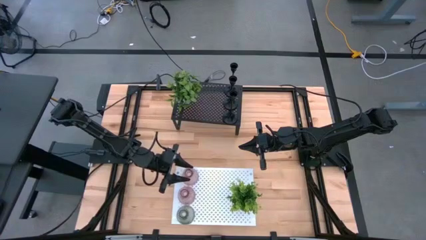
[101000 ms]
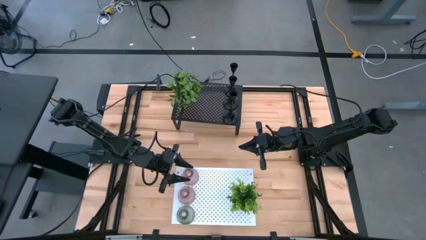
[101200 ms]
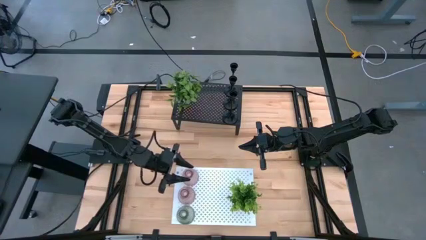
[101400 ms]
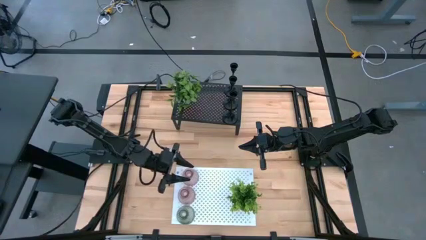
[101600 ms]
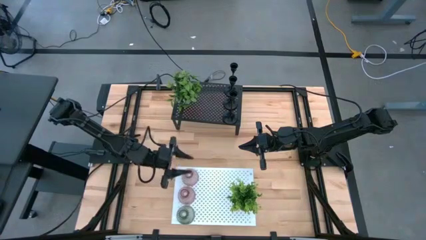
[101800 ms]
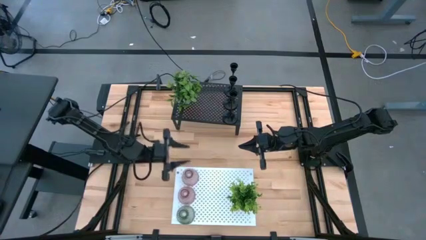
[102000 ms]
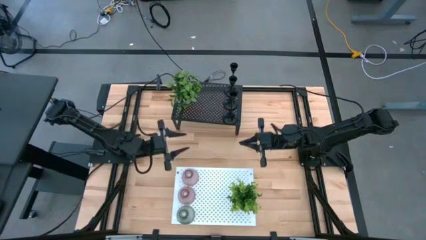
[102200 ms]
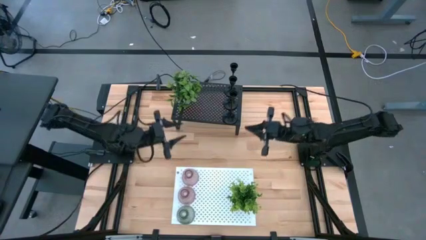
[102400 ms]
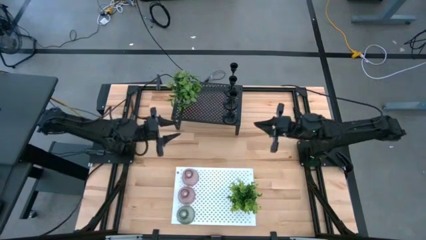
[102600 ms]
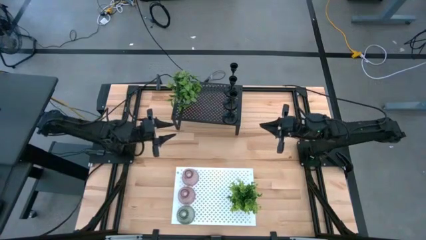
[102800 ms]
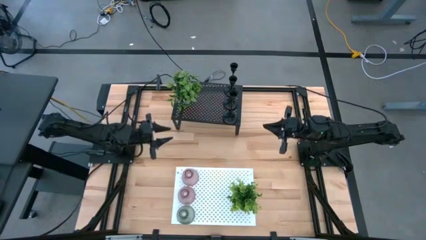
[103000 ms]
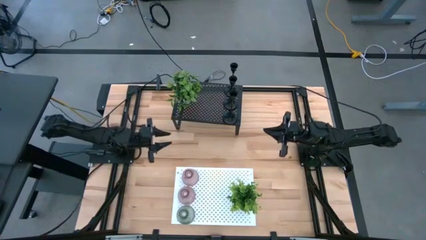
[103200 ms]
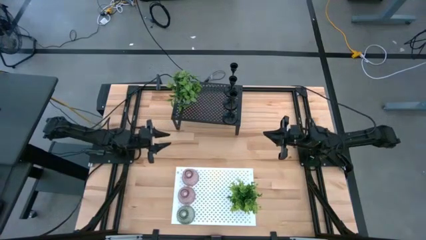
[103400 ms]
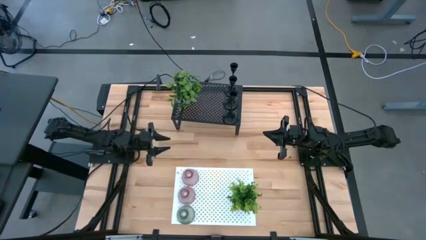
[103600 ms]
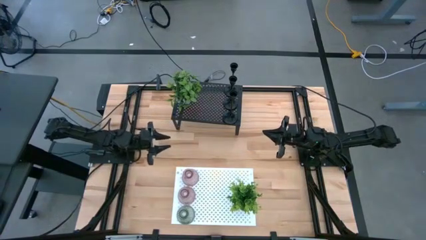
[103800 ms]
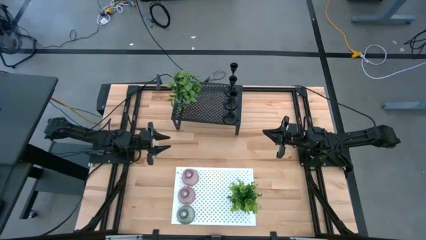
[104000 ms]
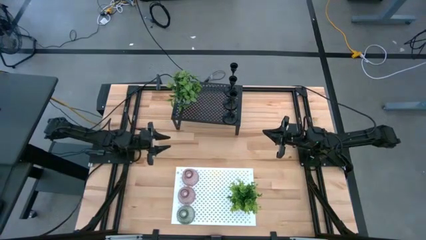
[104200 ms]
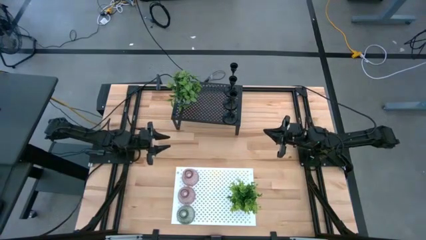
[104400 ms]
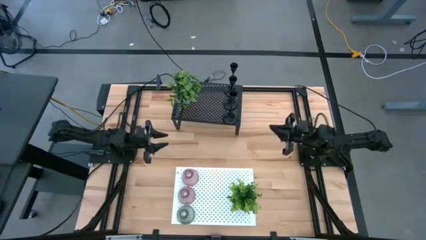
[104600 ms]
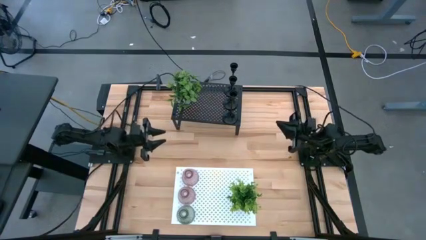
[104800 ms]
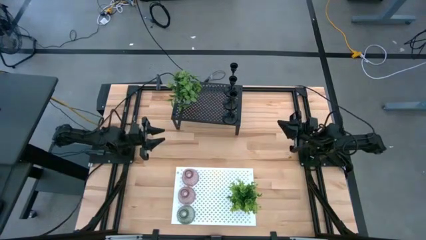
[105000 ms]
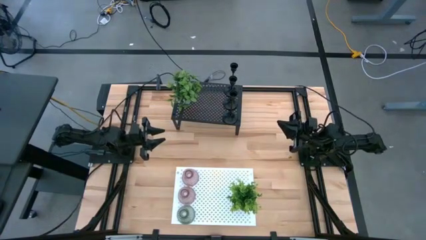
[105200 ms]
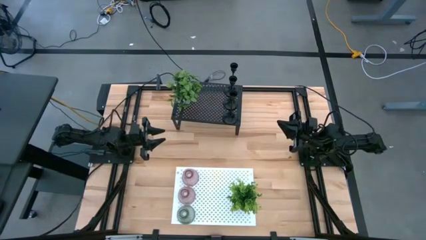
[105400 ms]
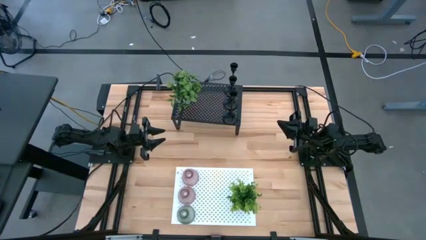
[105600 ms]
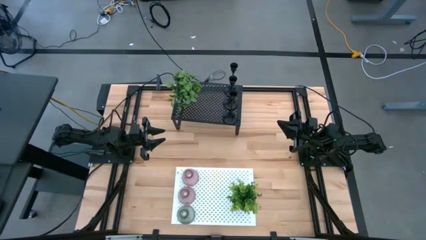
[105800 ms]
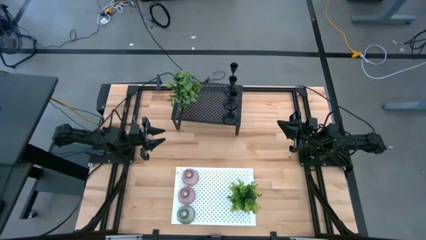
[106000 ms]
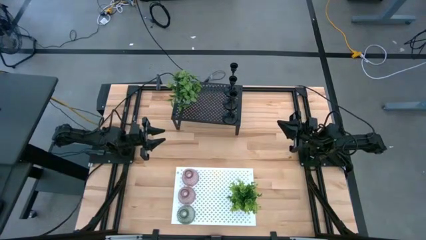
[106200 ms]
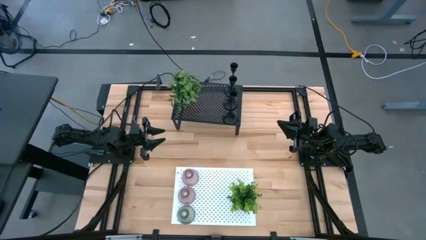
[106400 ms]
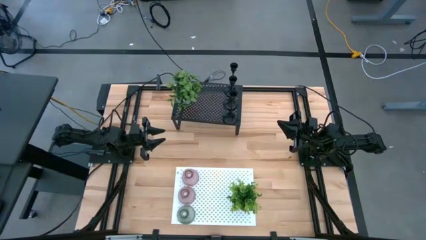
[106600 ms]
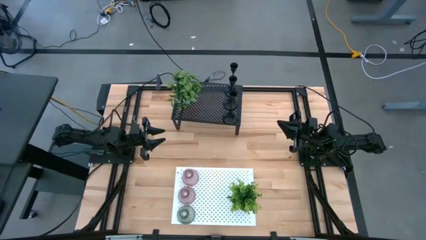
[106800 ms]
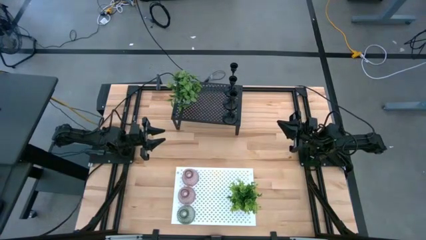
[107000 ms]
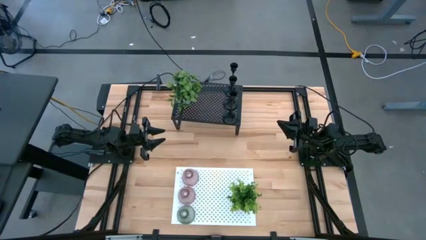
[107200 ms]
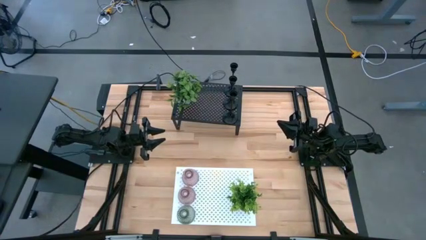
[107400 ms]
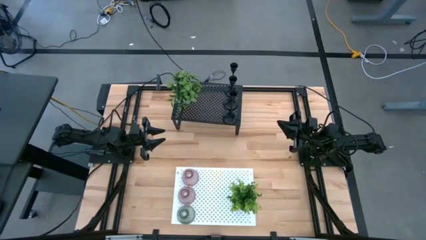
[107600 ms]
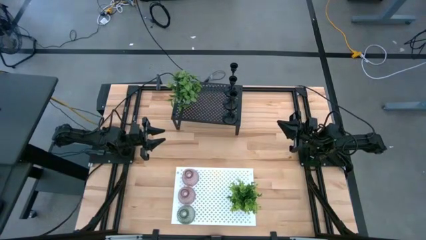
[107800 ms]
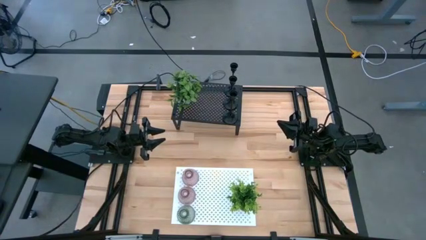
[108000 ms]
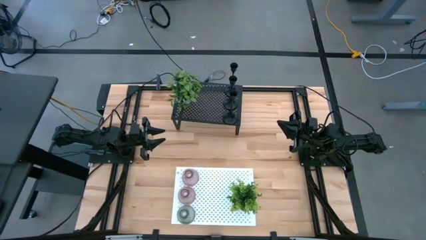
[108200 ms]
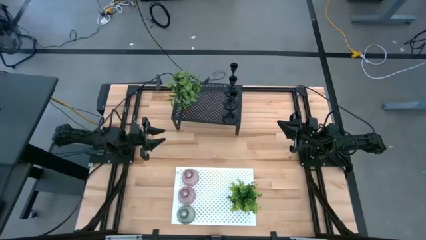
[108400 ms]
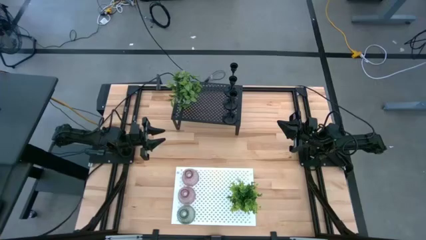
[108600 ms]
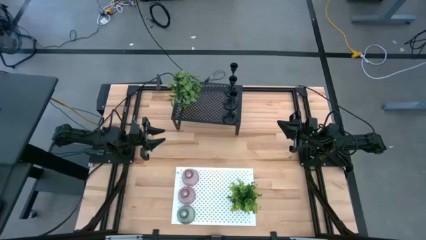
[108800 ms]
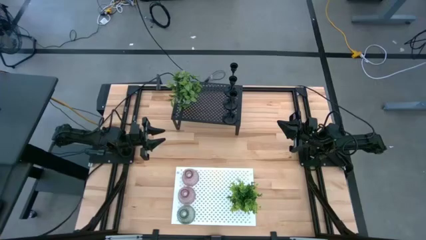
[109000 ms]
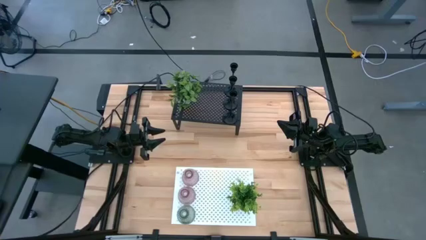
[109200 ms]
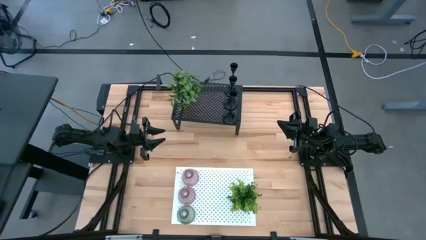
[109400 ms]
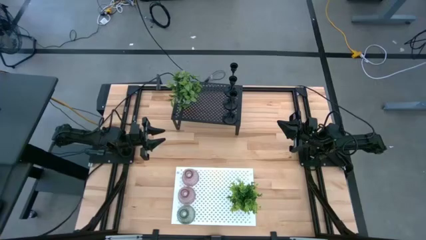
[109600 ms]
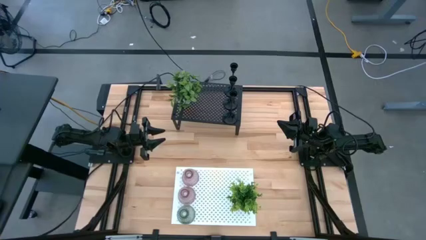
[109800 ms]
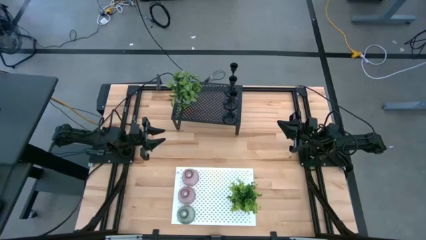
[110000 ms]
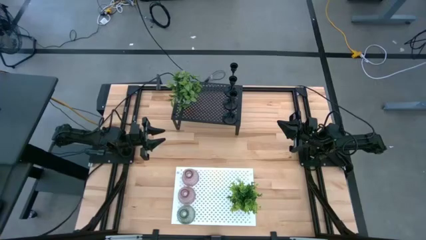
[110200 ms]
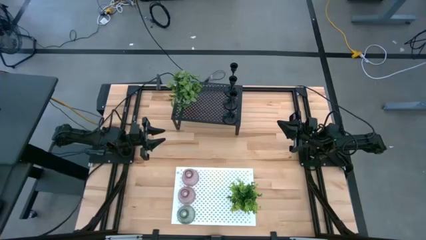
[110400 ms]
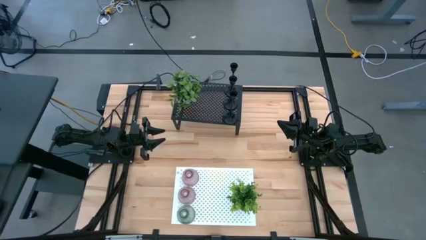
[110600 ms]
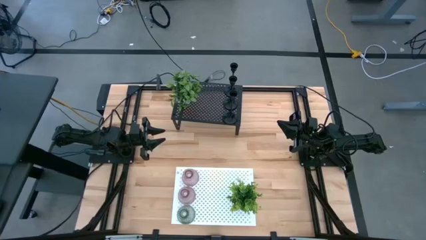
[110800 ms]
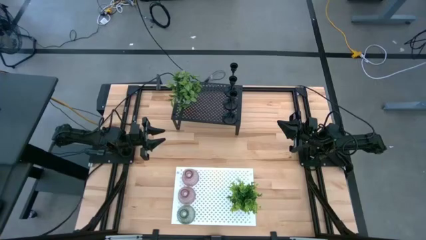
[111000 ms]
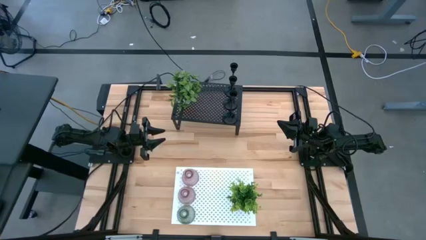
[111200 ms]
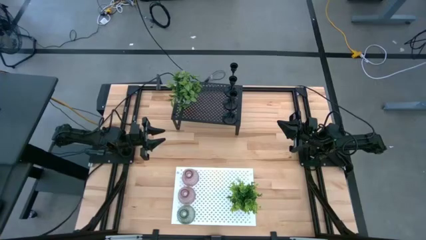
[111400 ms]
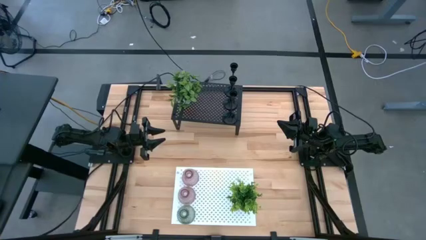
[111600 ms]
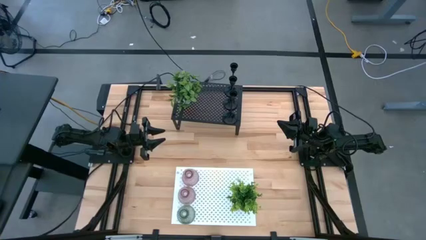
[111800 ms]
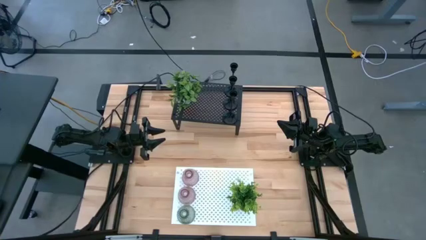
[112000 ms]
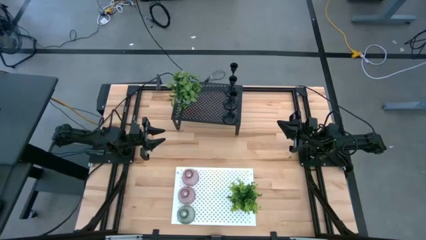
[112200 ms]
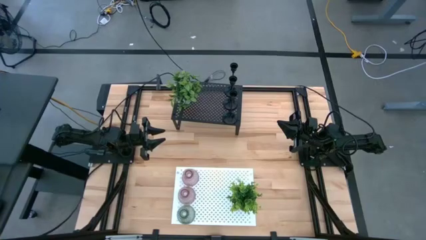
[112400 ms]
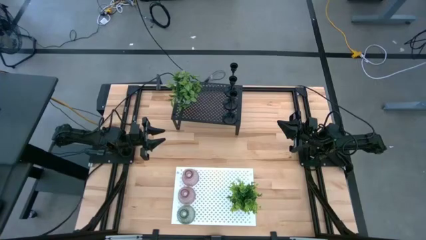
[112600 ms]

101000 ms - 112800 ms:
Task: Pick & Place candle stick holders
Return to Home Position

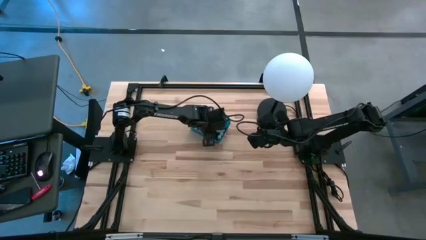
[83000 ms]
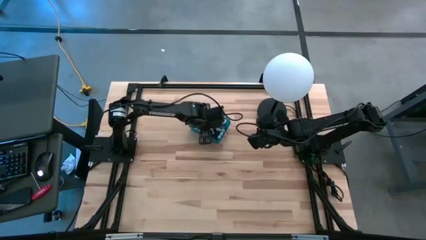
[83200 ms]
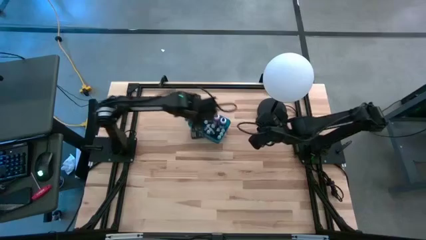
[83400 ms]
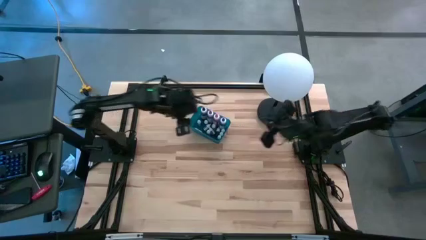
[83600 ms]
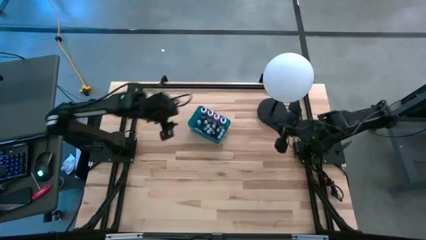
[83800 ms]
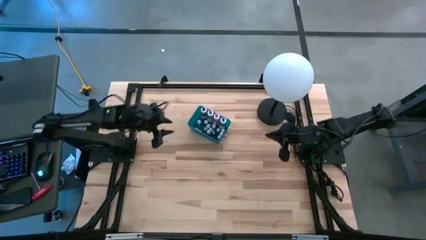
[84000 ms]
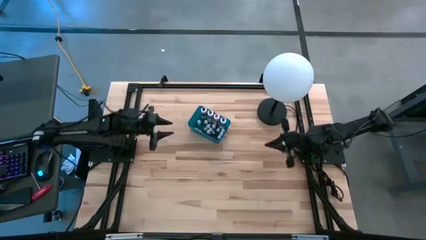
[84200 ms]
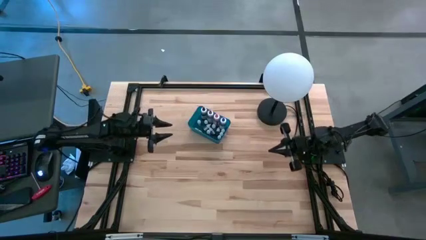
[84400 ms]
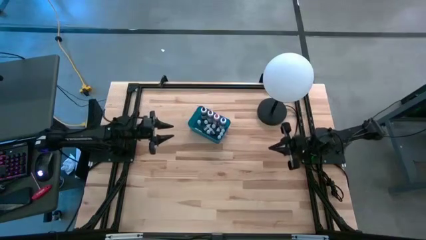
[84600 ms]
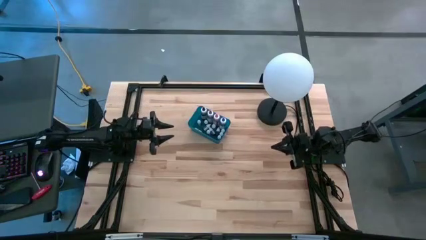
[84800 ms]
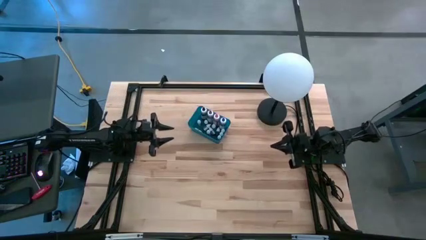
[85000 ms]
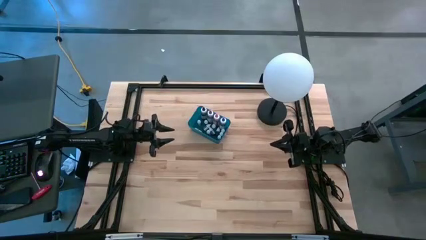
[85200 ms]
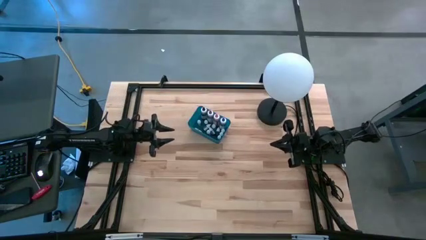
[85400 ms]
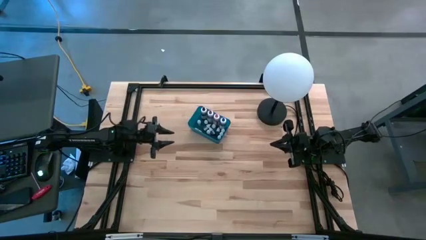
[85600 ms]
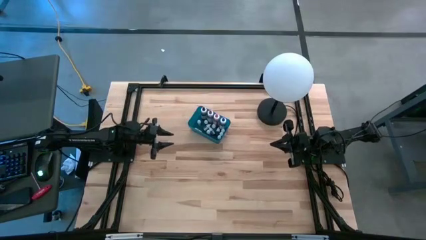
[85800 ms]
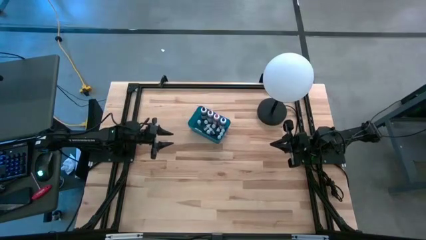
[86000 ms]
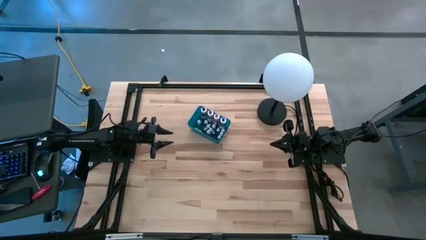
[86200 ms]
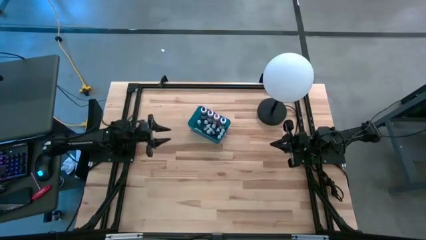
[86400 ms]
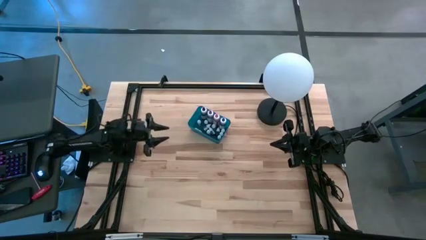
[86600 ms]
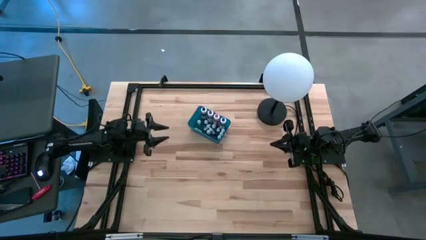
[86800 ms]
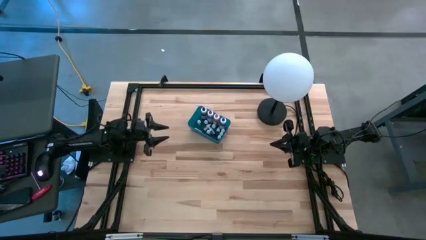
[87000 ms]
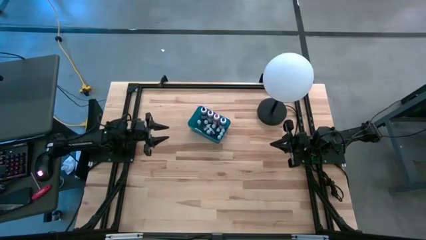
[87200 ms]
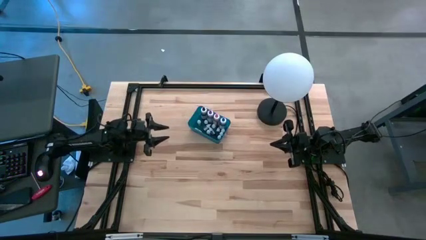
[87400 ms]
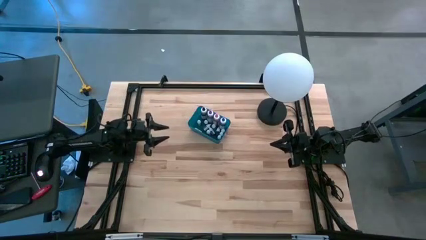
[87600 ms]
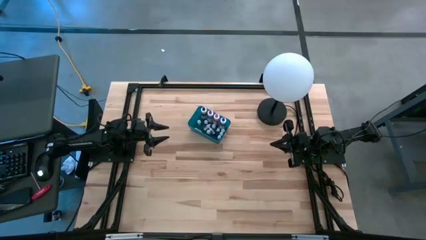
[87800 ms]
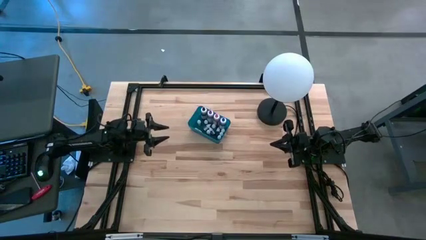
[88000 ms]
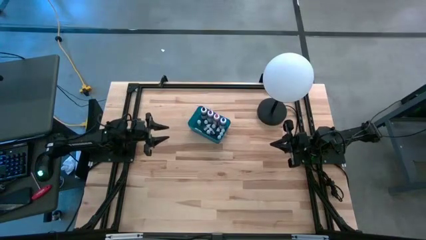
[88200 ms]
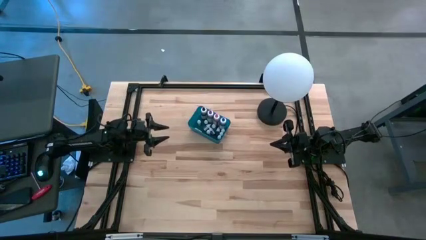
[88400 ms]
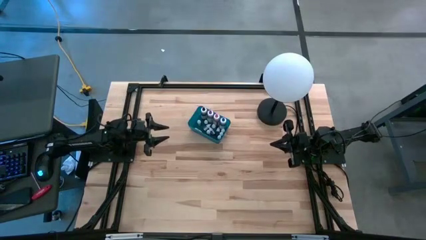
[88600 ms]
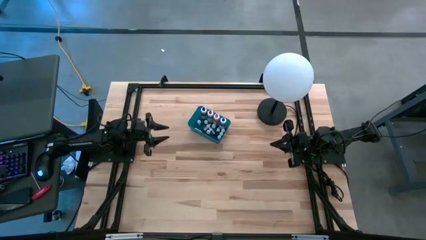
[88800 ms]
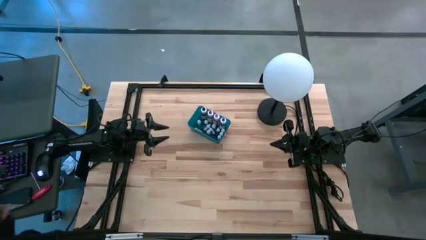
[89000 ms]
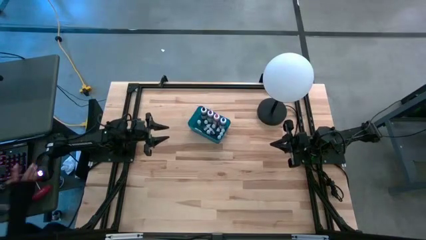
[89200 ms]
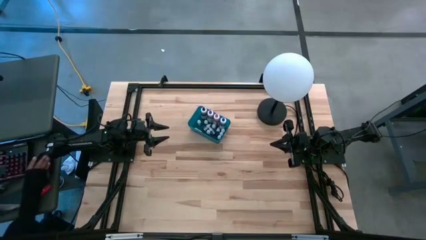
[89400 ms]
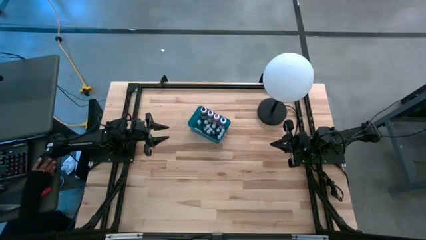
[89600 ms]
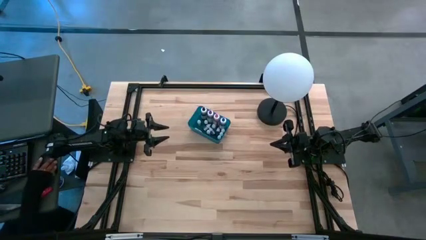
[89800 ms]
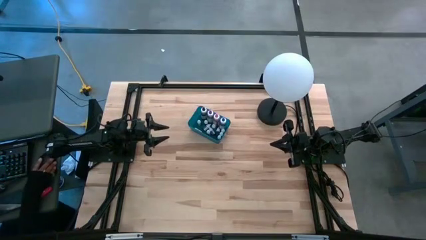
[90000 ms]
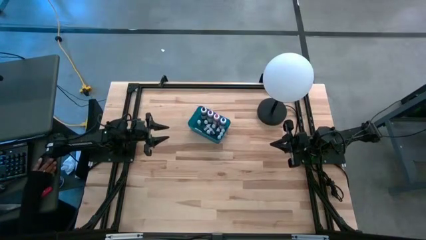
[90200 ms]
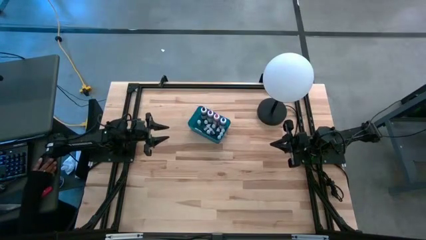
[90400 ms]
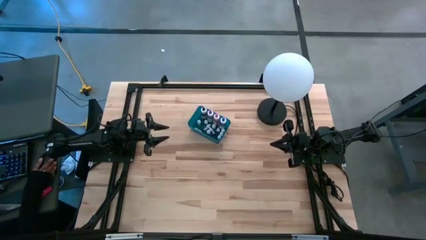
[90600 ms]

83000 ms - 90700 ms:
Task: Pick & Place food coloring
Return to Home Position
